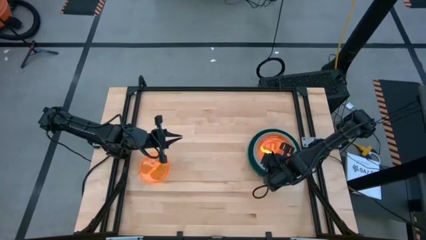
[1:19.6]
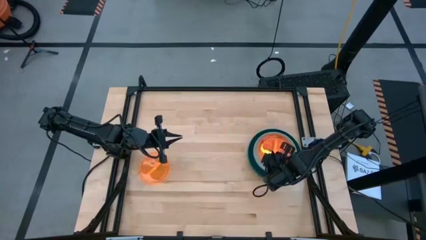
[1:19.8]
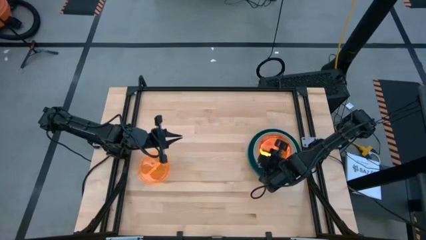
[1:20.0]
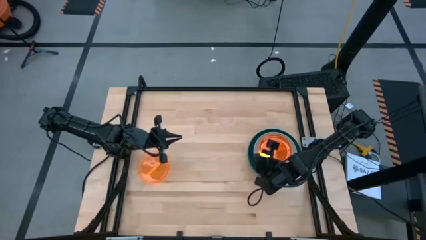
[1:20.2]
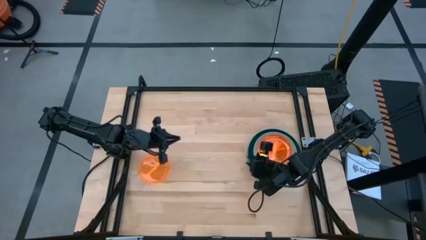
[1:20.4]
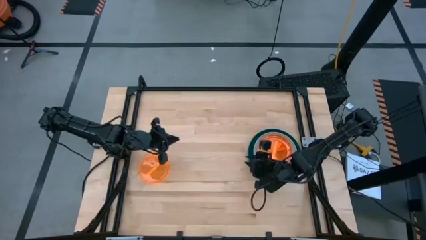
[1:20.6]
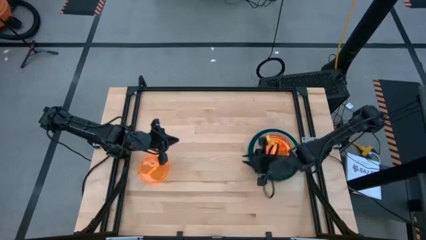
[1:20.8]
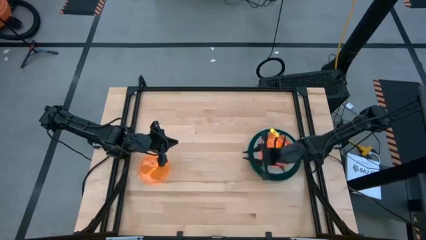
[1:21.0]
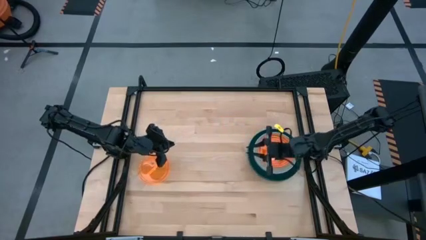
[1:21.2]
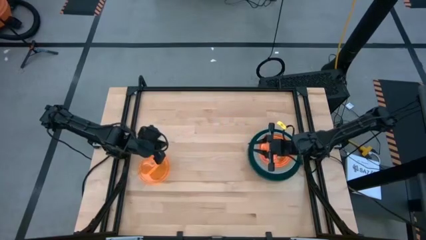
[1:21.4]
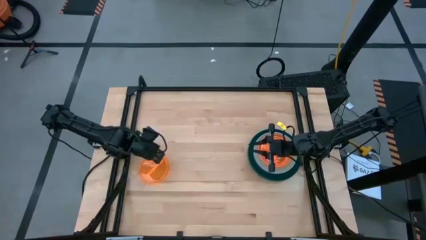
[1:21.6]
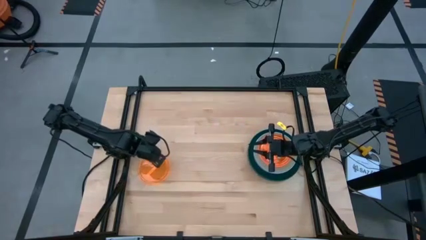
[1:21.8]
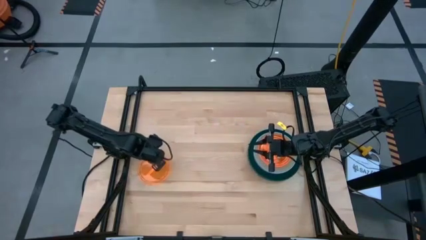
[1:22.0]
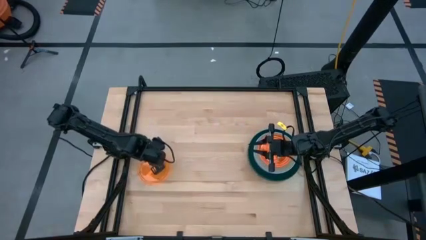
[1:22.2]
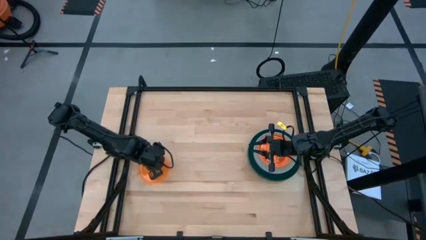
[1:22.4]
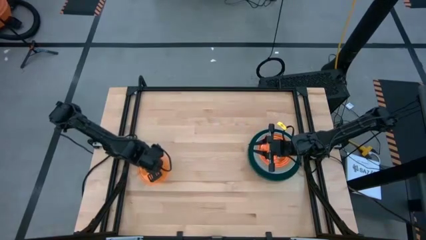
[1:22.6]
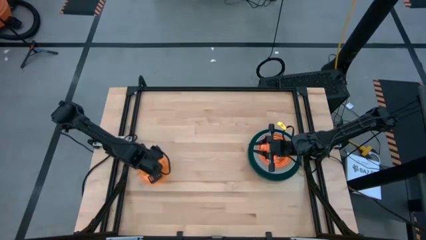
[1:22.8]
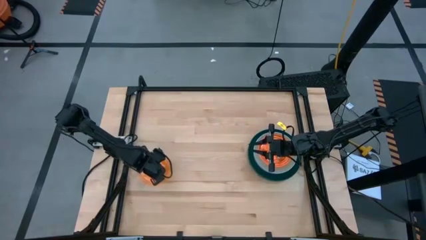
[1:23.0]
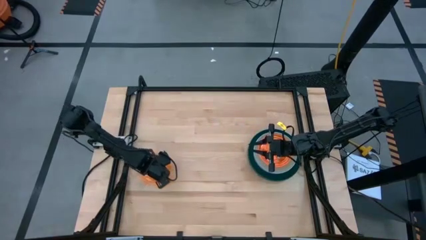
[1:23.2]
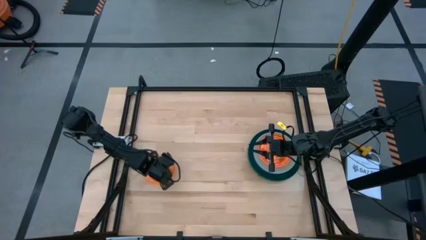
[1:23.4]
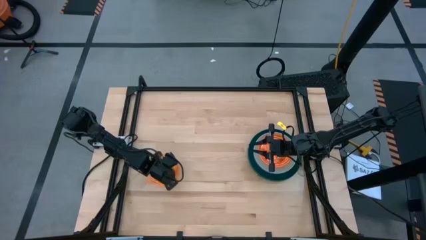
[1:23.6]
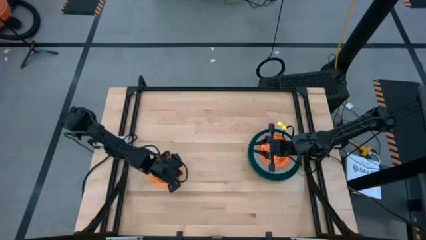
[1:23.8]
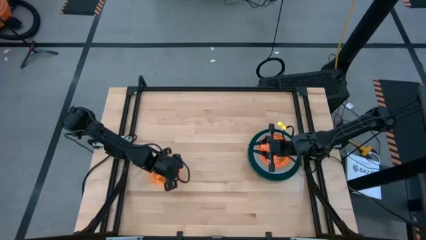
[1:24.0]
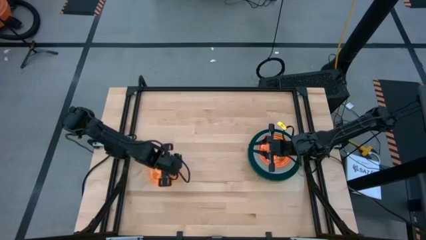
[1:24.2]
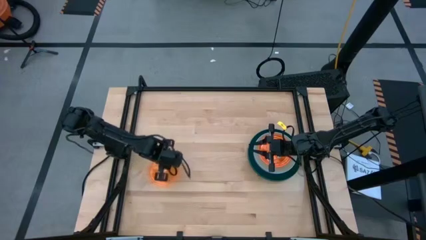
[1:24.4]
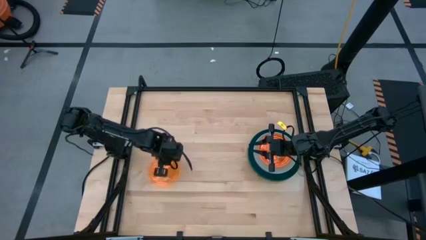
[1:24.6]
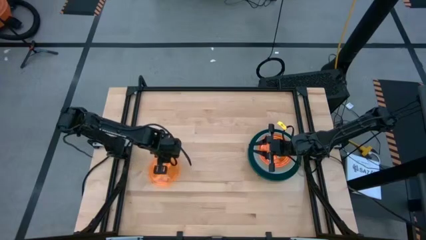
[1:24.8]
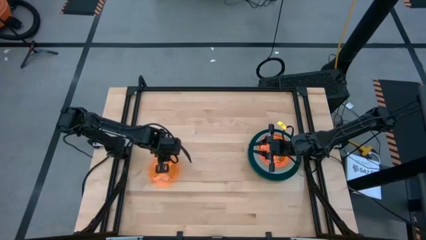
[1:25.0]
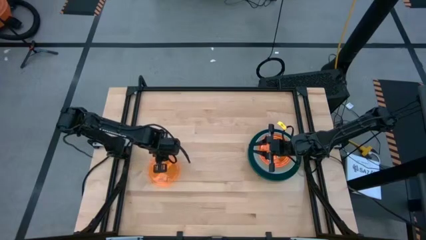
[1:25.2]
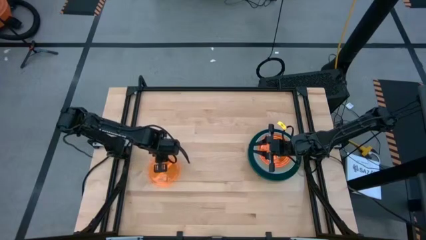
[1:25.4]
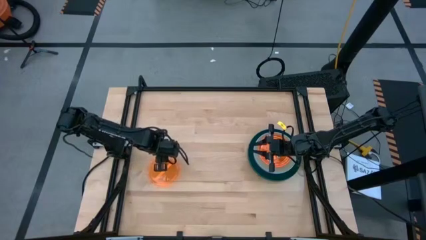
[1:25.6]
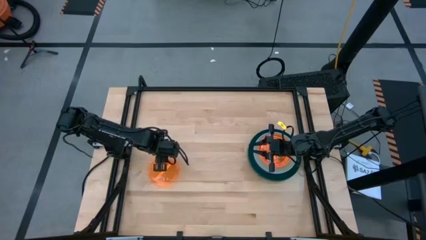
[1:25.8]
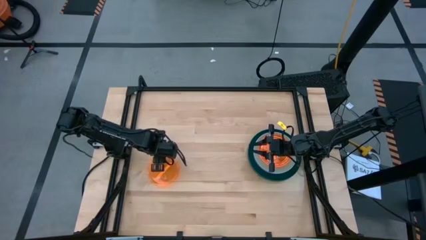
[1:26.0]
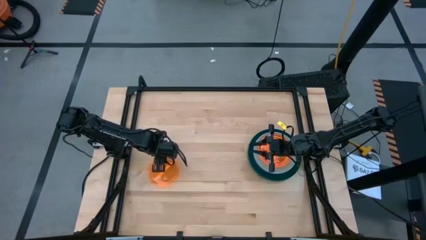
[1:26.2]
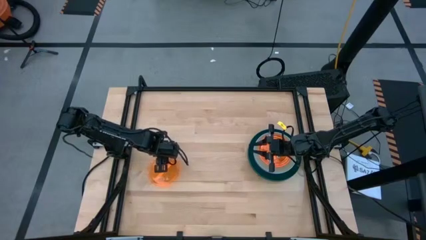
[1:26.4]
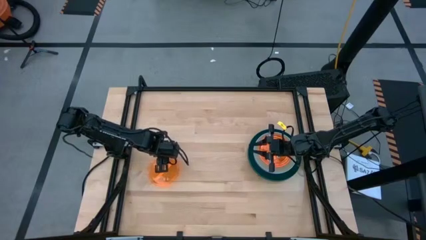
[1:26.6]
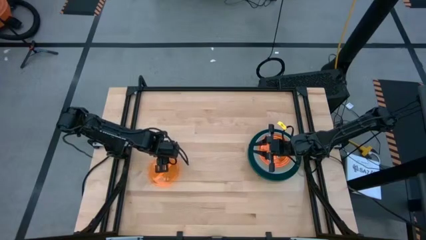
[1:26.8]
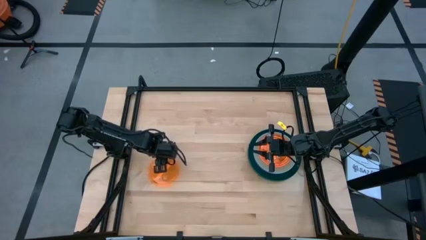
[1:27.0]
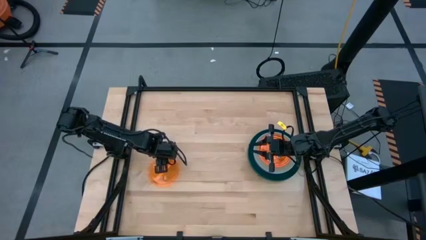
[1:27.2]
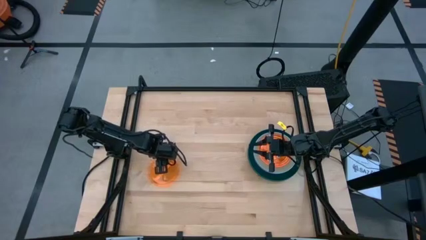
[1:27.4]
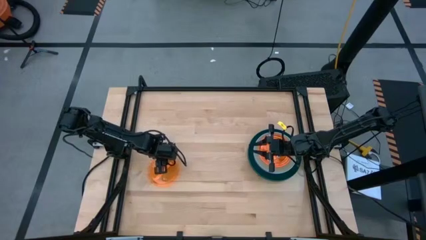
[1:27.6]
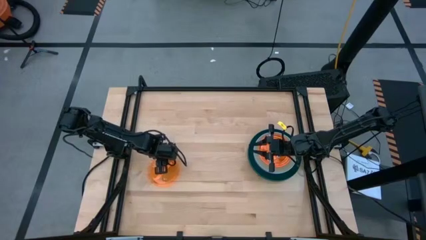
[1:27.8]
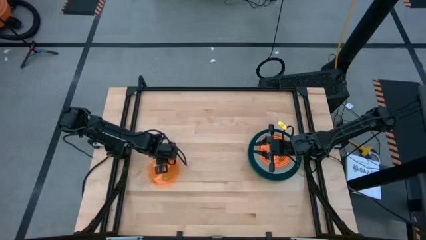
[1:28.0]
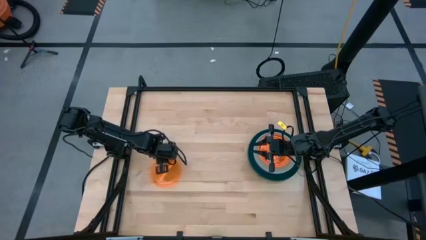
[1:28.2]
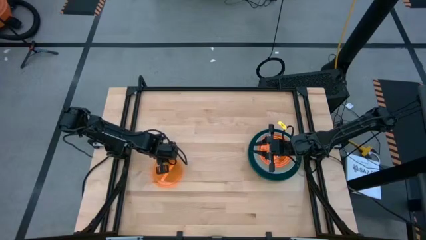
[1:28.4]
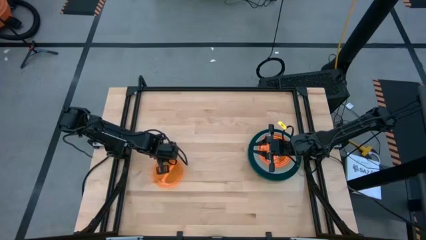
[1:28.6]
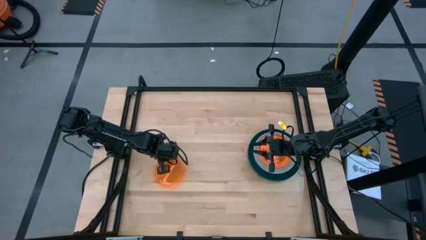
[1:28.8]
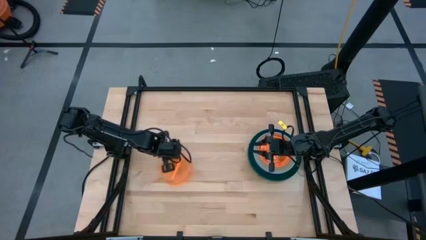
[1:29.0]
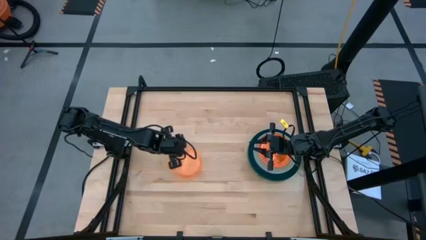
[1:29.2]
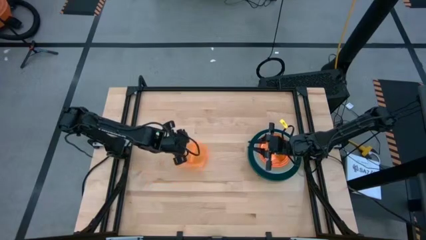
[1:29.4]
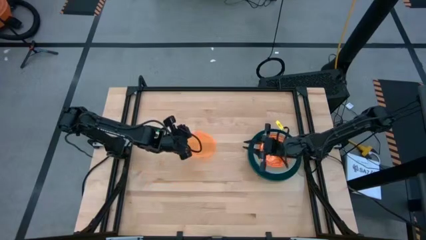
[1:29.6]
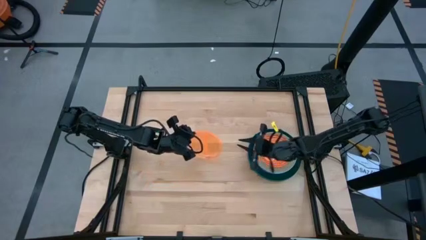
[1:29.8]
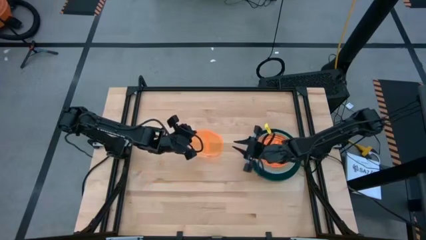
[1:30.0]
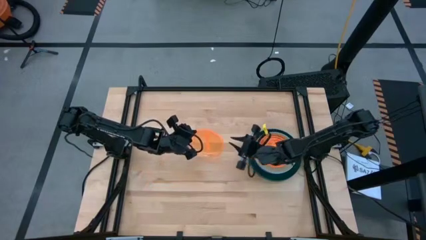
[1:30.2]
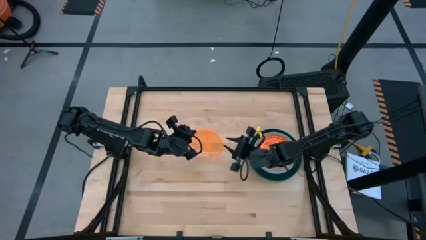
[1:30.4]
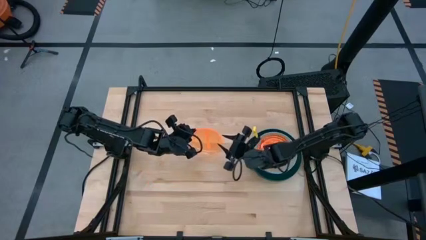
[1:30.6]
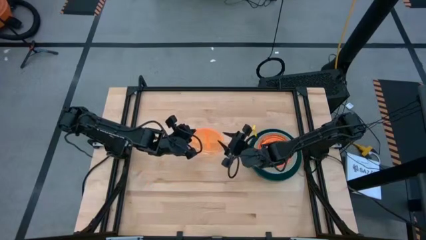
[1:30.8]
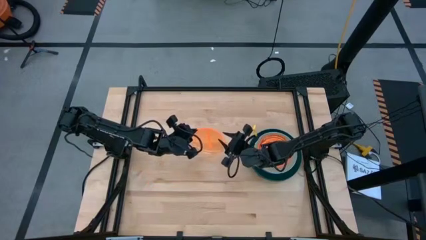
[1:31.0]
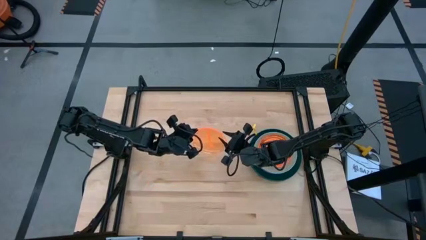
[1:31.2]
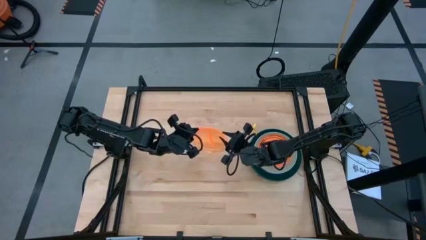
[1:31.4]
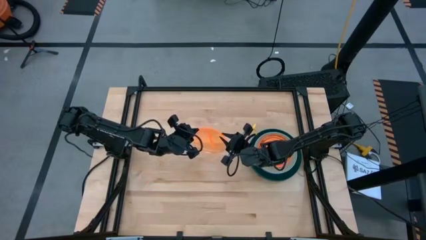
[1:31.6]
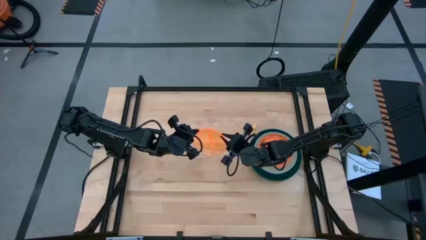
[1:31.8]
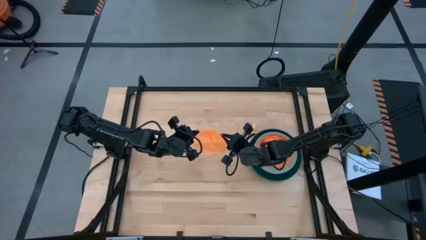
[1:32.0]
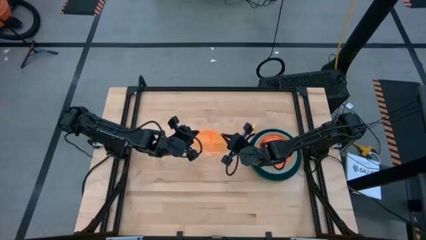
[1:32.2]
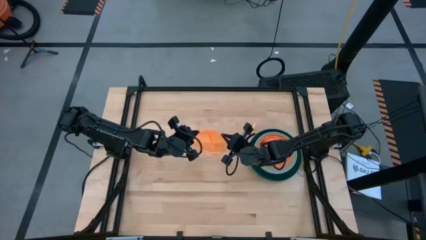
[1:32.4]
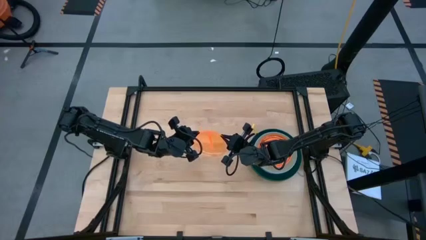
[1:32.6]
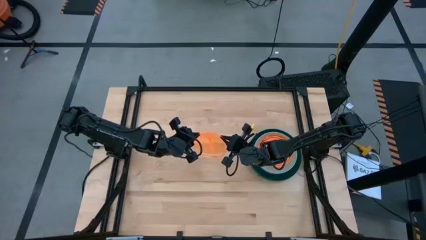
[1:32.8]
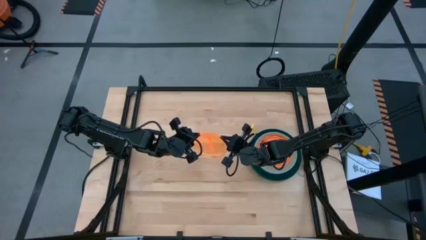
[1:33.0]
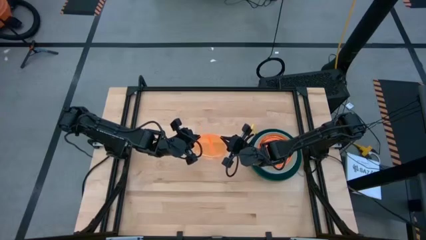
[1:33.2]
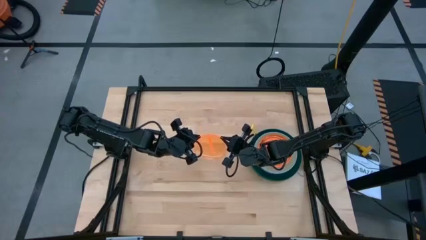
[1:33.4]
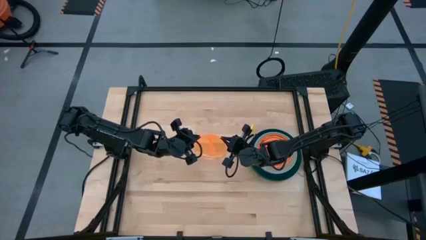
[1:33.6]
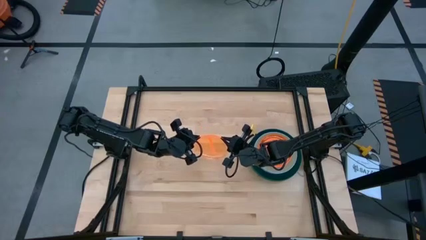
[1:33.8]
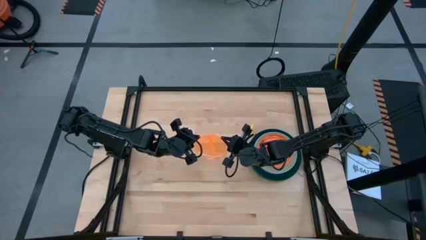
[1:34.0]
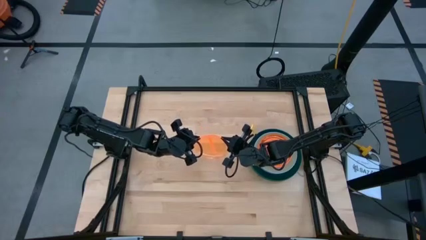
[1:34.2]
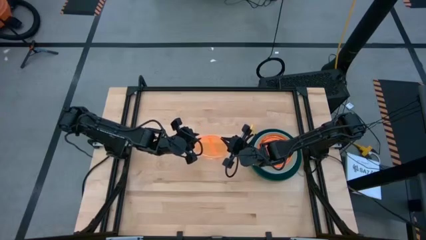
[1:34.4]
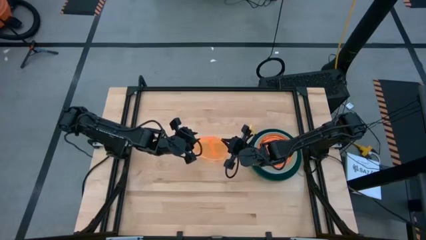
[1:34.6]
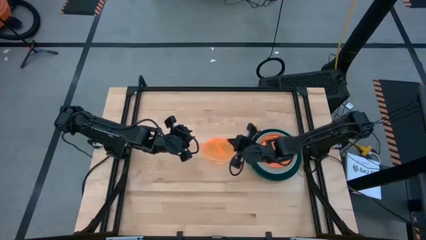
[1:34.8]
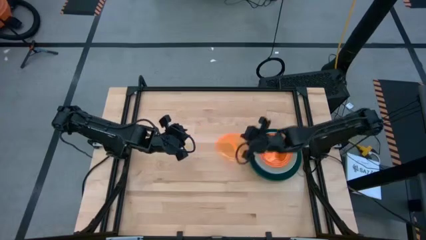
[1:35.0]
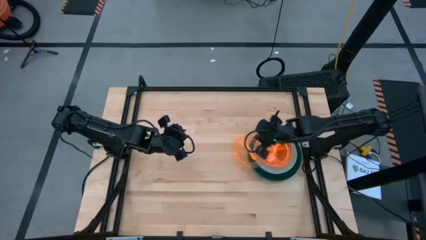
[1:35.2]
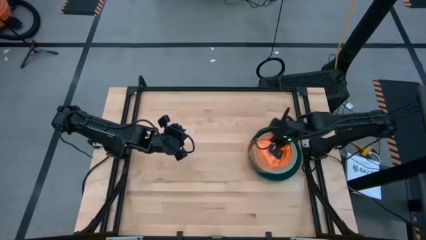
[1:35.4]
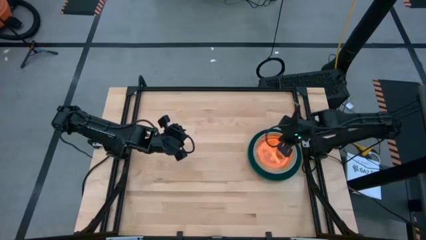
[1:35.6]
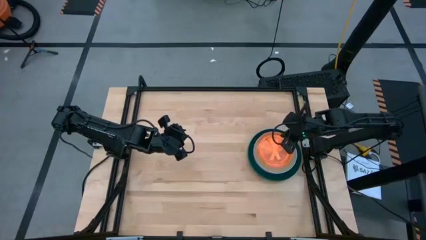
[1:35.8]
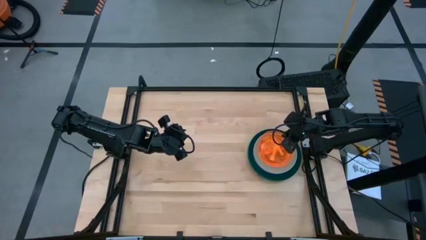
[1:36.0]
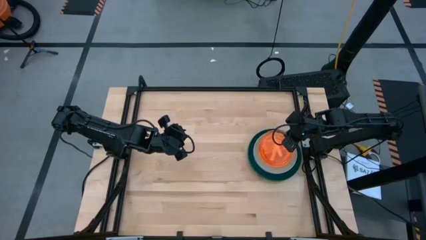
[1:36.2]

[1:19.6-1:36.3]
Task: Stack plastic plates
Stack the orange plate on top of the orange plate

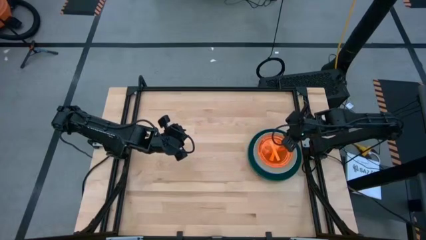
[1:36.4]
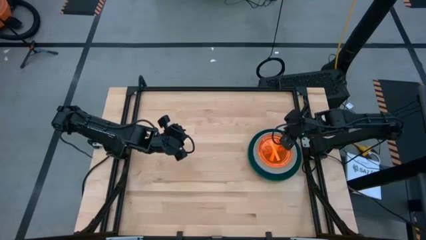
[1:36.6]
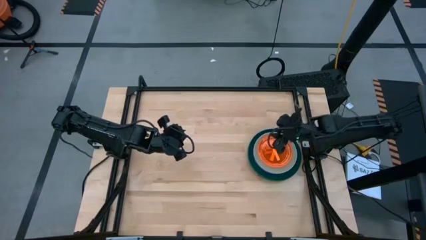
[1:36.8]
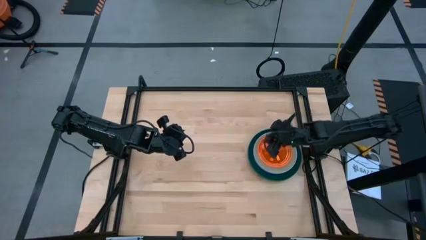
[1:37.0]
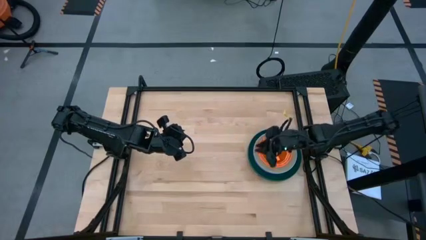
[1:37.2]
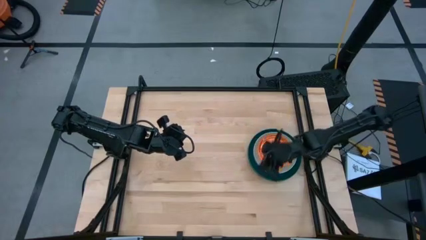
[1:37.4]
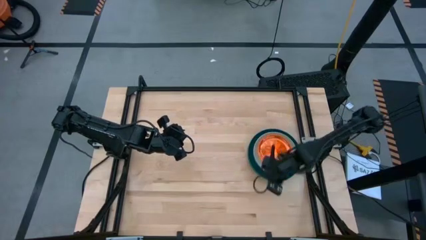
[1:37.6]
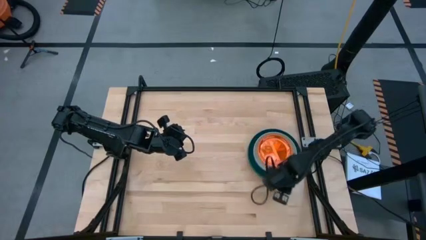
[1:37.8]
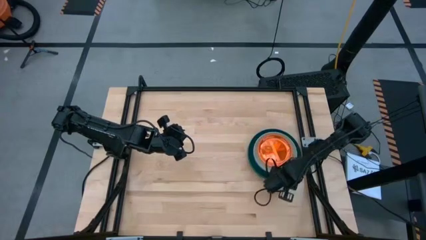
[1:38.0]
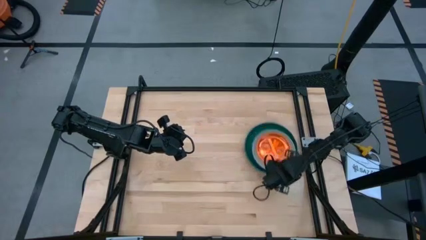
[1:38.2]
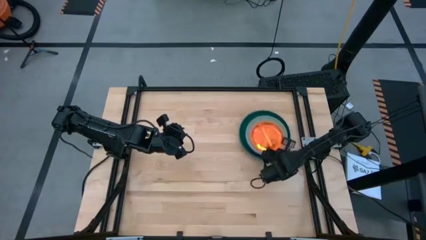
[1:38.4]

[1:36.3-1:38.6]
Adjust the stacked plates
